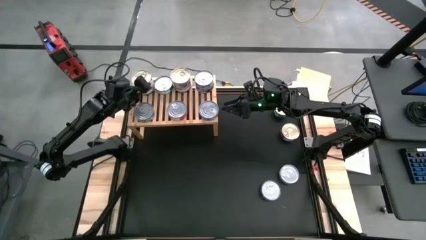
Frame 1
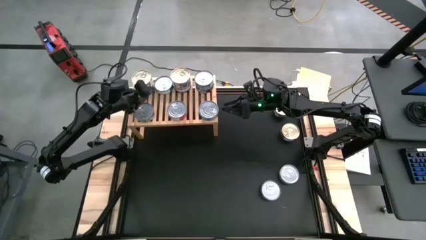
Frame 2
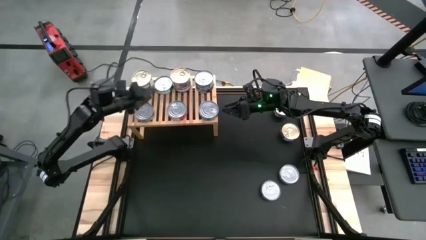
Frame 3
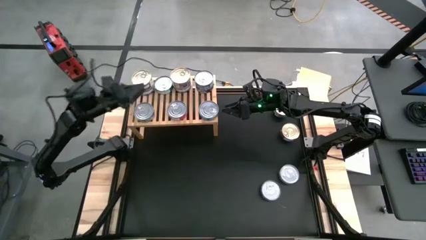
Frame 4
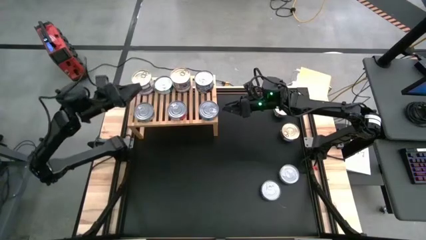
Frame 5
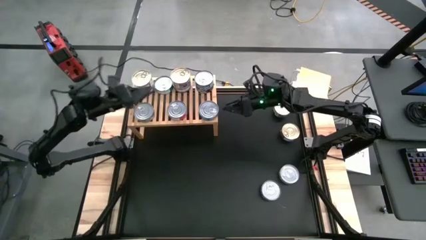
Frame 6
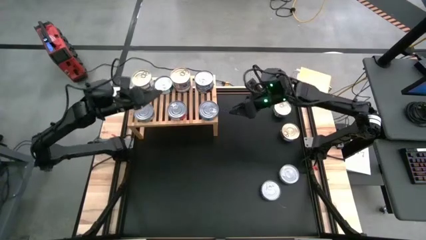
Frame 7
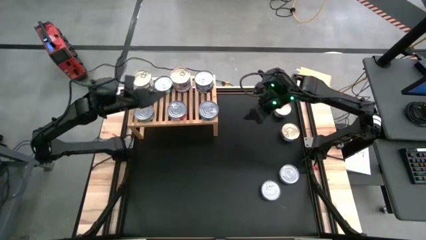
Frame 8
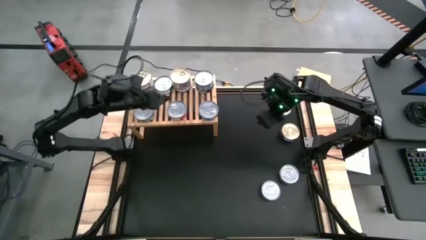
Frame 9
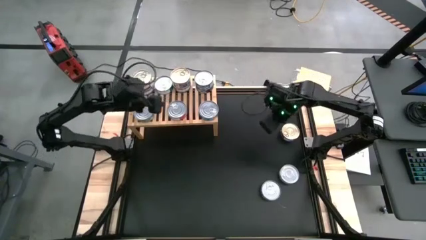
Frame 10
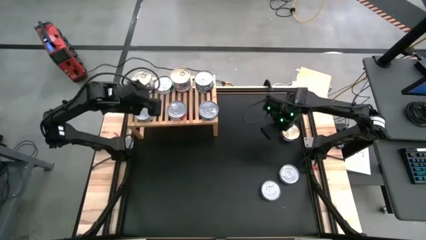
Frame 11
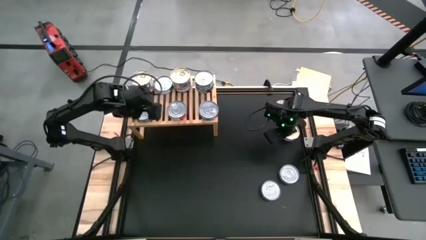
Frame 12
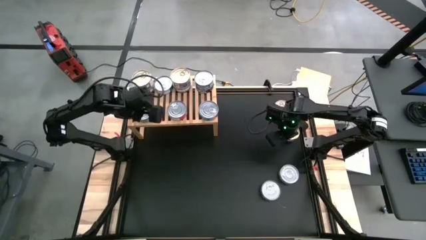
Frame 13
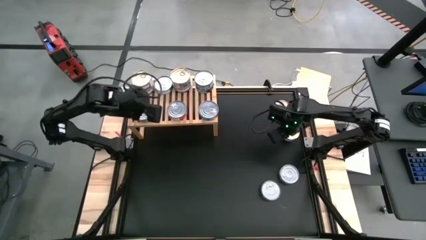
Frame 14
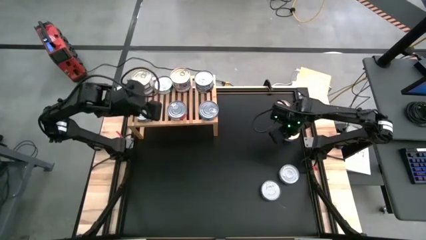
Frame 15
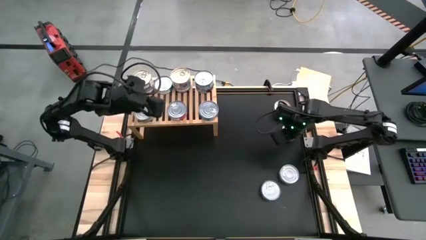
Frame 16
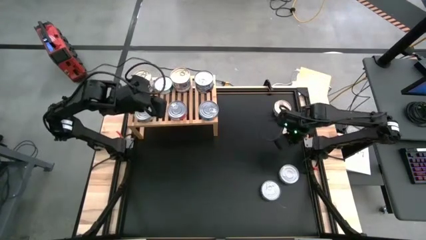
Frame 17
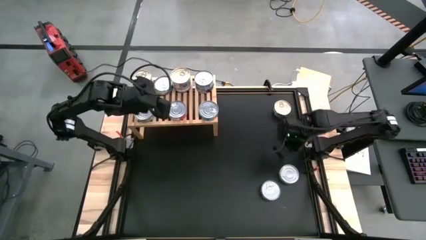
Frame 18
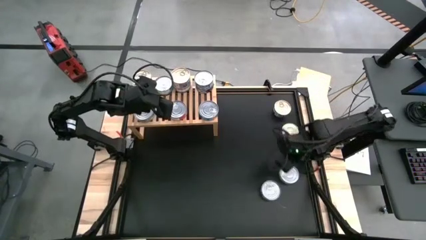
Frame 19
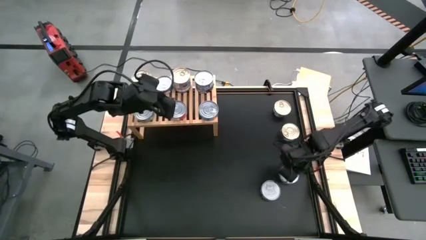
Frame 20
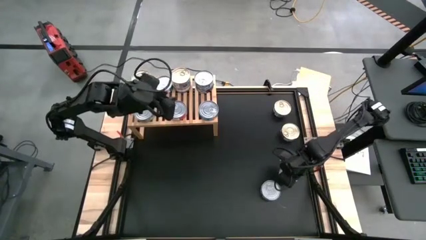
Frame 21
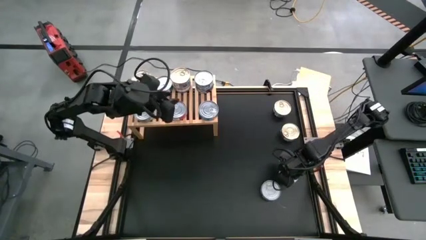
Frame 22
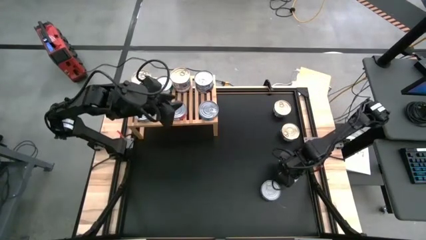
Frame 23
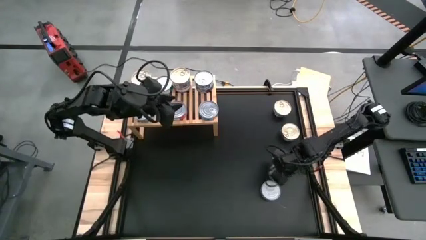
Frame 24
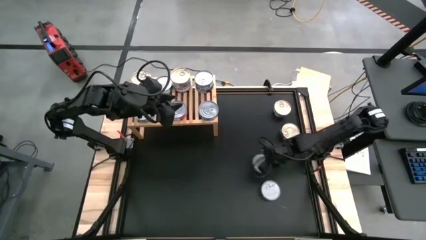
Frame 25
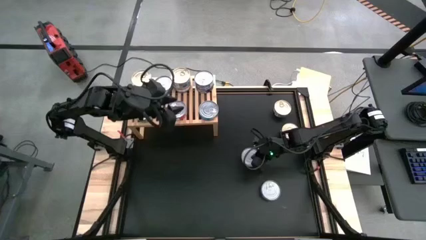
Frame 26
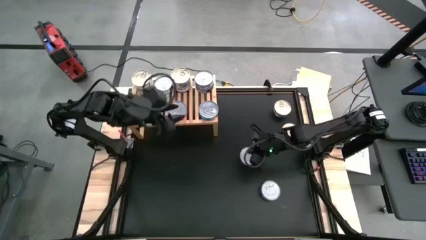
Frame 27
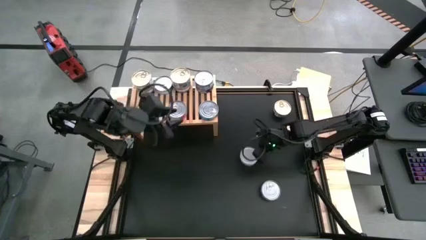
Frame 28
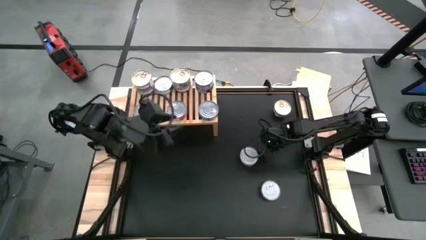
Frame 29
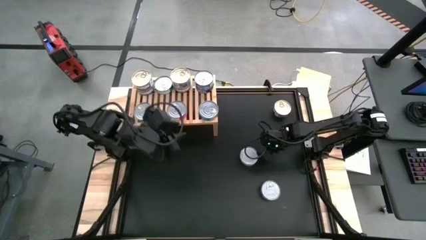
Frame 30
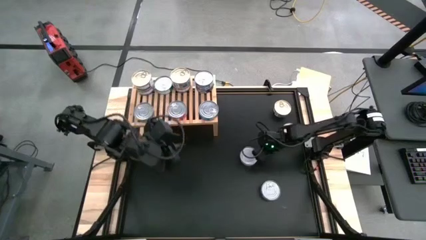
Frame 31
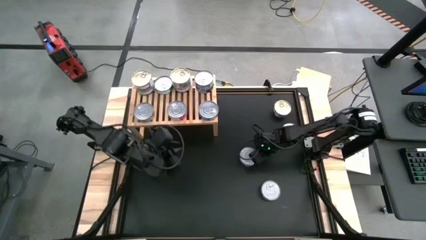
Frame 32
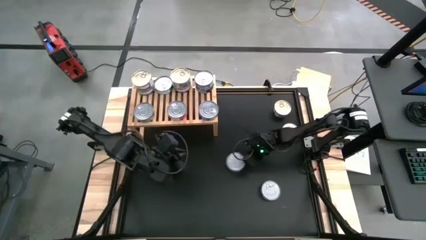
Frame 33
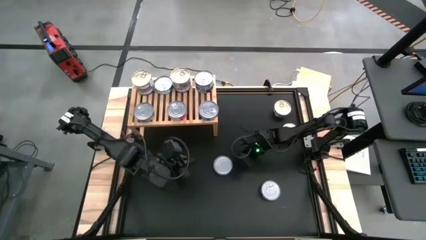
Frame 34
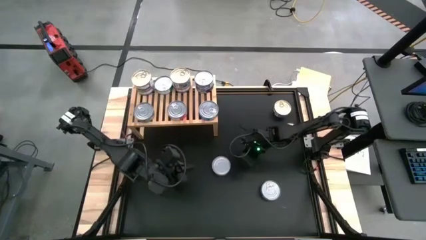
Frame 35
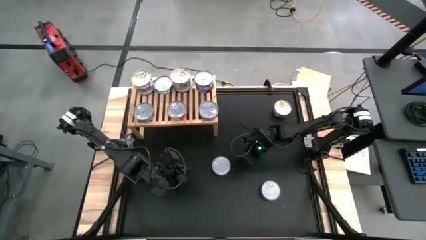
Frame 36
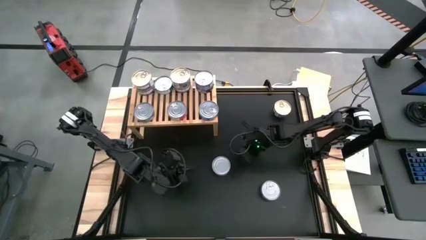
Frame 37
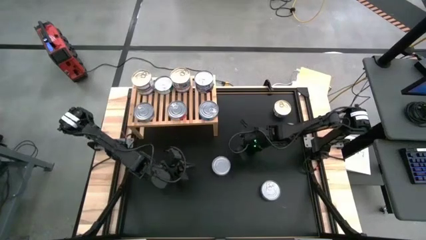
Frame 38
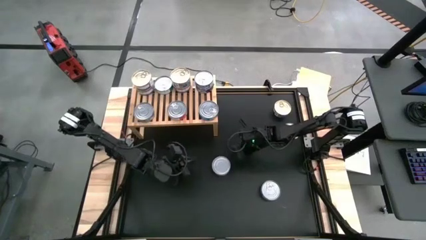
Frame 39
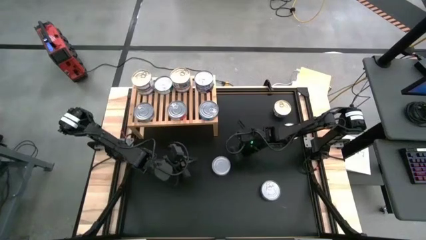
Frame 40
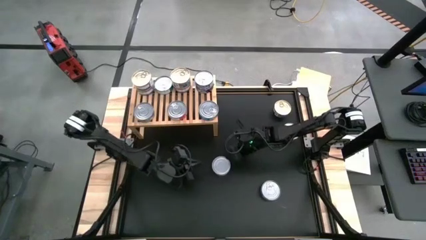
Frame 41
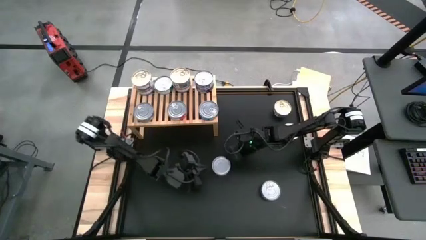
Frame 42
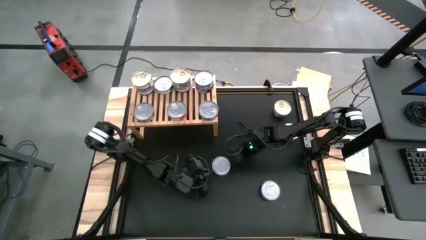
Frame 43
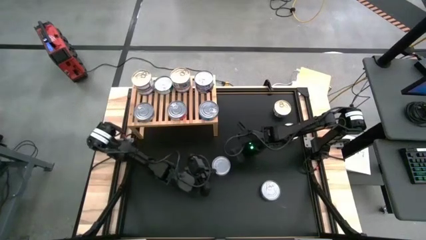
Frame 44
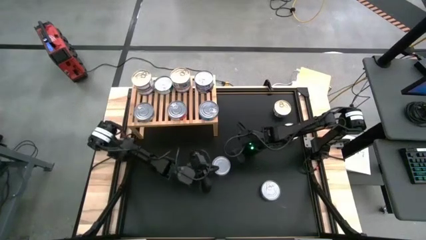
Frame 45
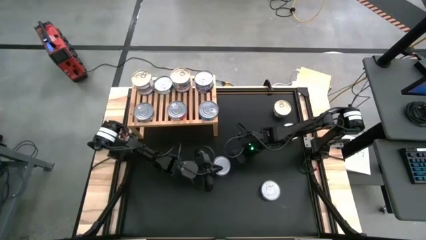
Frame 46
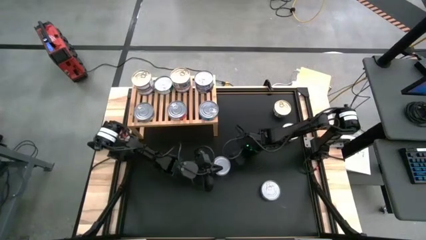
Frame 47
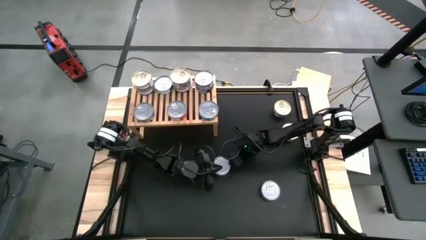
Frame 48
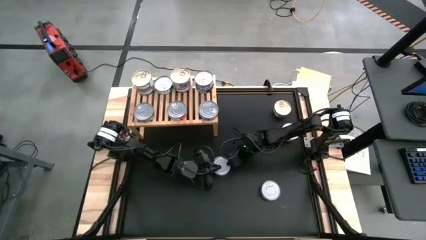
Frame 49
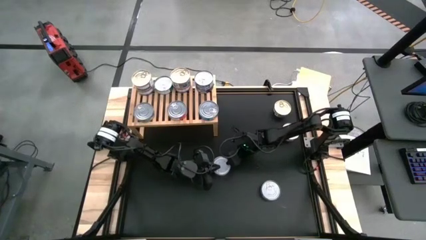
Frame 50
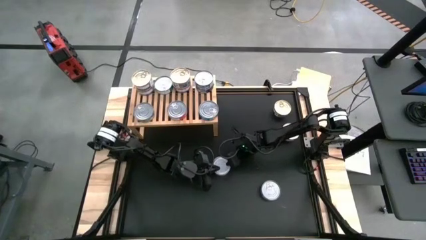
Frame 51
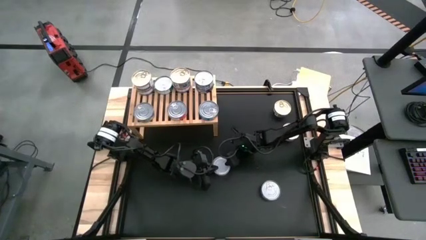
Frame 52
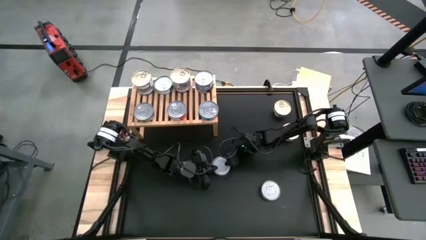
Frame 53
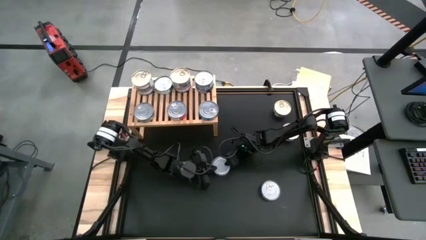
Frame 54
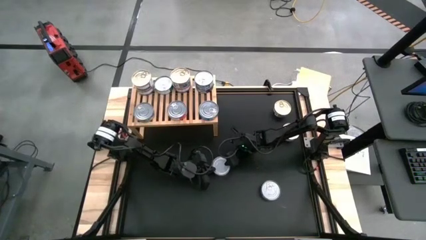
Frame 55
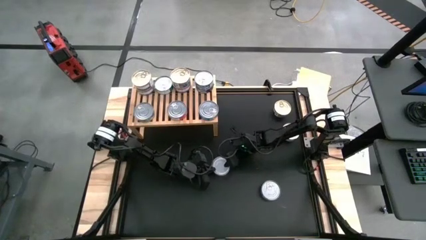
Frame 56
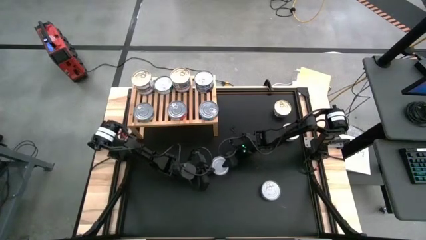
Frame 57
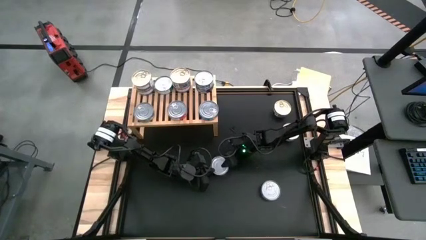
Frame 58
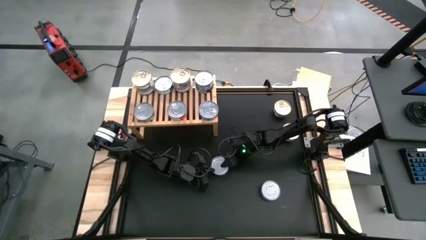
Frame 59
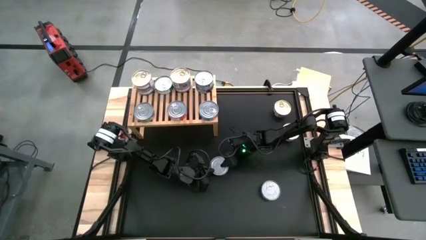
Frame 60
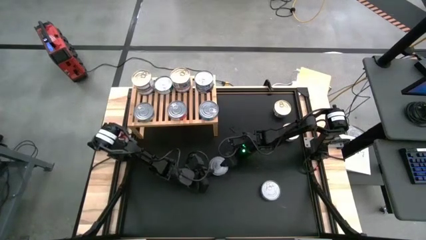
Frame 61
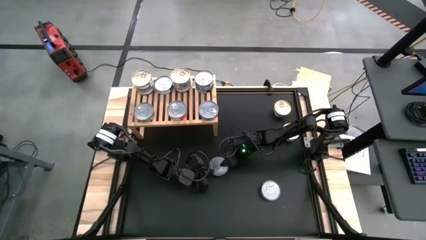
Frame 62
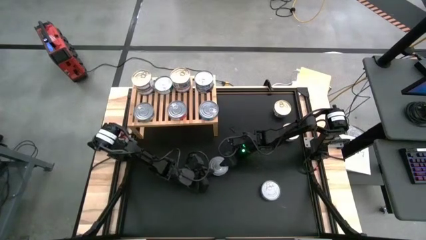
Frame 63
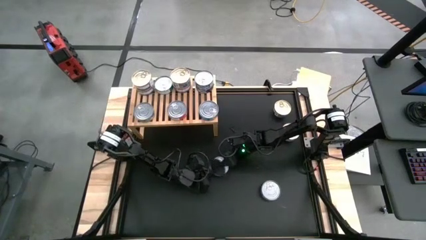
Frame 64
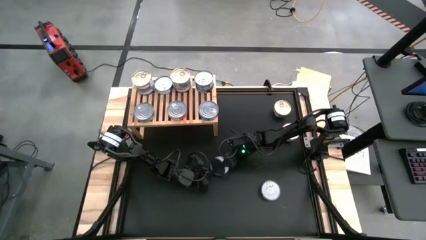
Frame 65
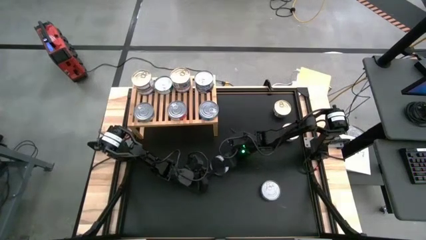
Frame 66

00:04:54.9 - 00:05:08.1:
Task: Stack canned seafood by type on shelf
Put the green tuna can on the shelf
